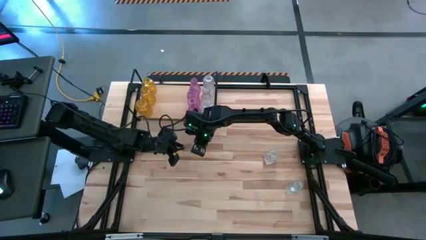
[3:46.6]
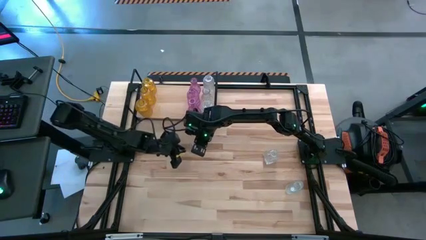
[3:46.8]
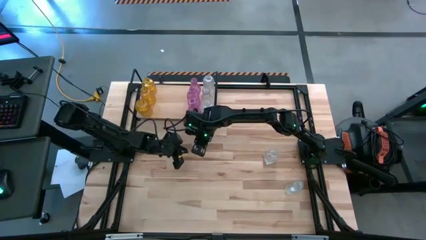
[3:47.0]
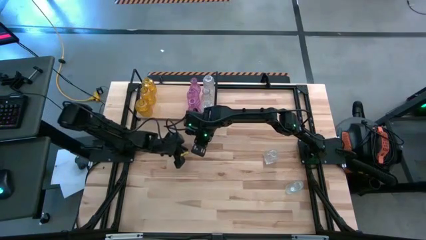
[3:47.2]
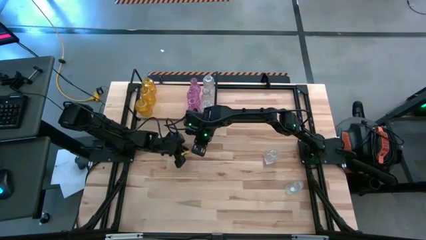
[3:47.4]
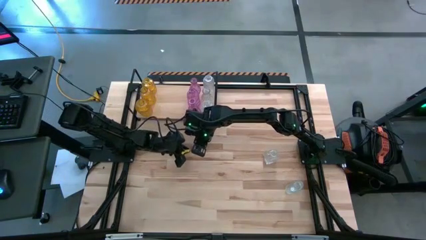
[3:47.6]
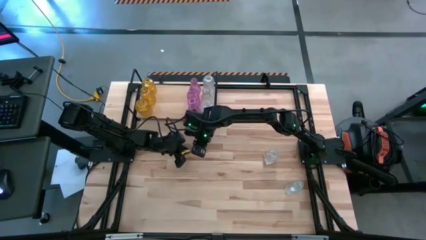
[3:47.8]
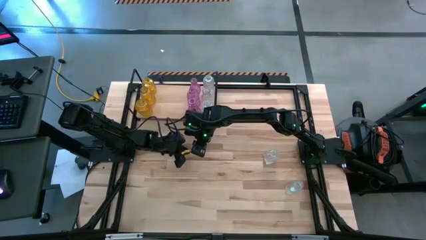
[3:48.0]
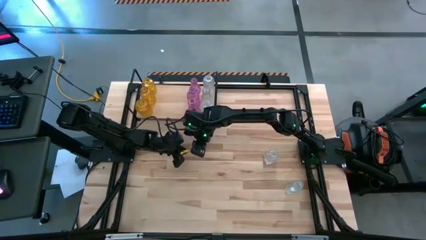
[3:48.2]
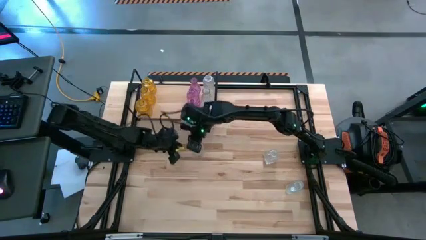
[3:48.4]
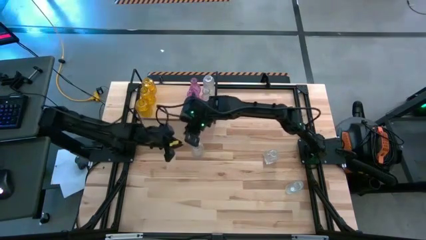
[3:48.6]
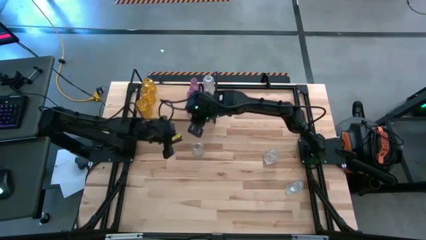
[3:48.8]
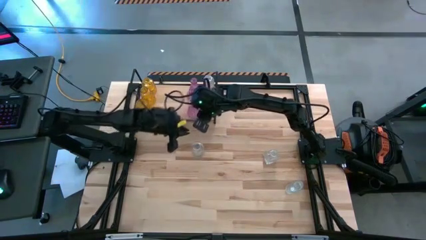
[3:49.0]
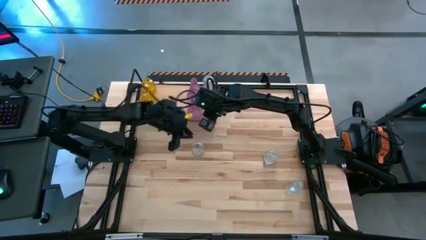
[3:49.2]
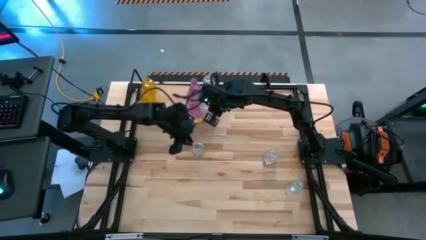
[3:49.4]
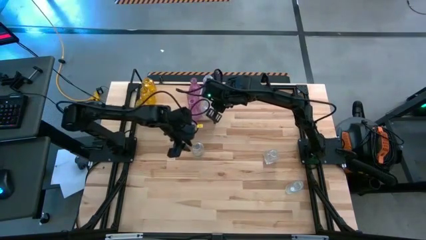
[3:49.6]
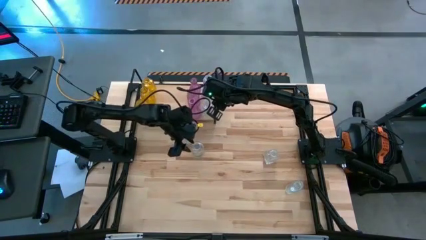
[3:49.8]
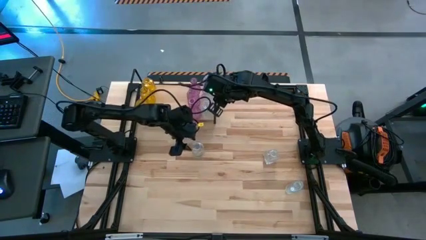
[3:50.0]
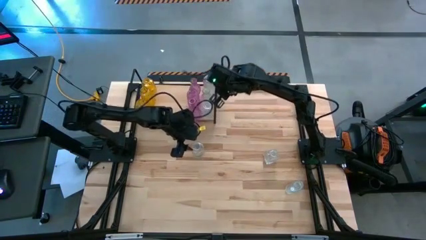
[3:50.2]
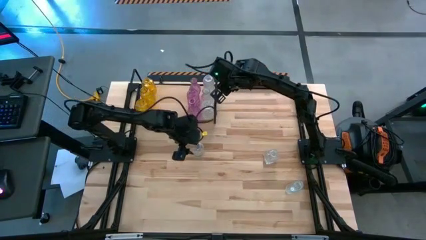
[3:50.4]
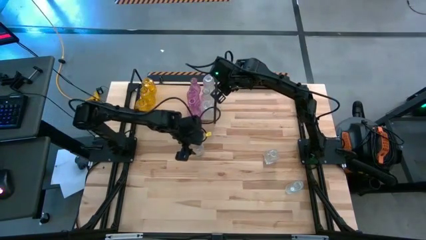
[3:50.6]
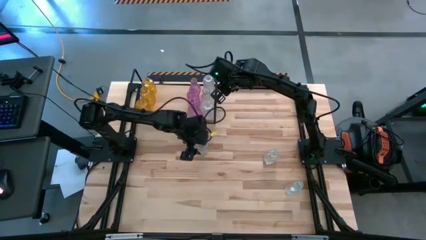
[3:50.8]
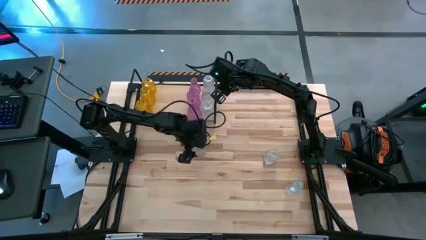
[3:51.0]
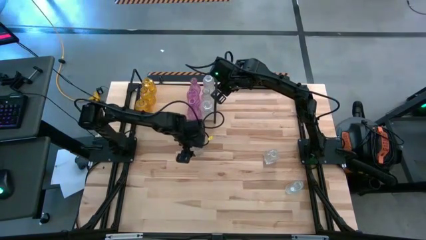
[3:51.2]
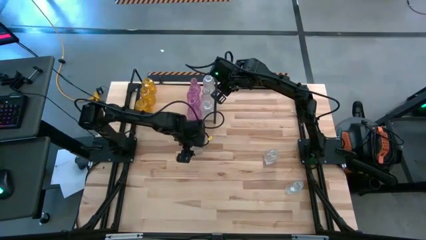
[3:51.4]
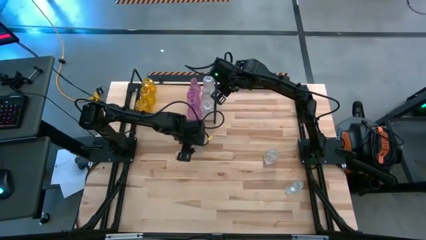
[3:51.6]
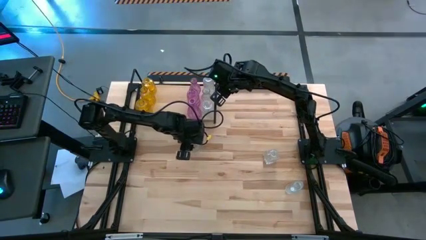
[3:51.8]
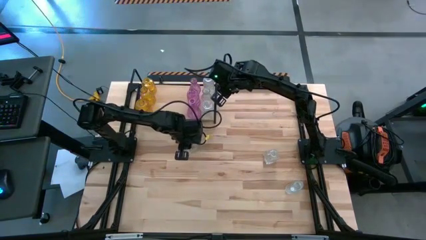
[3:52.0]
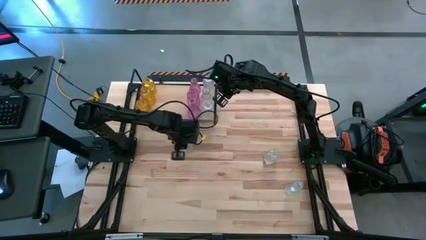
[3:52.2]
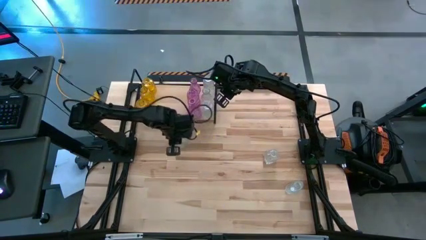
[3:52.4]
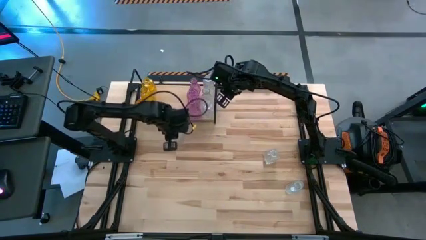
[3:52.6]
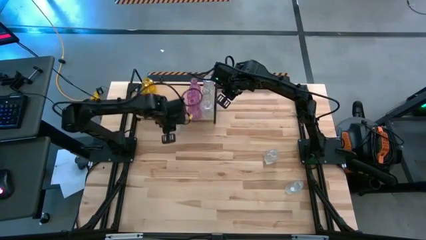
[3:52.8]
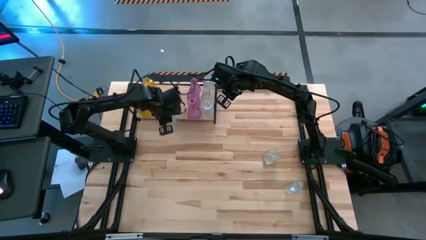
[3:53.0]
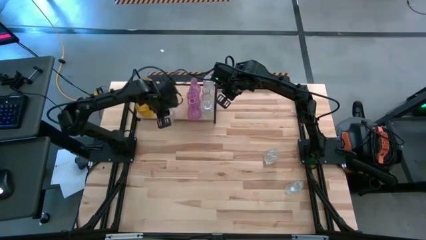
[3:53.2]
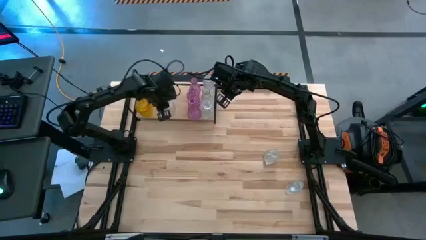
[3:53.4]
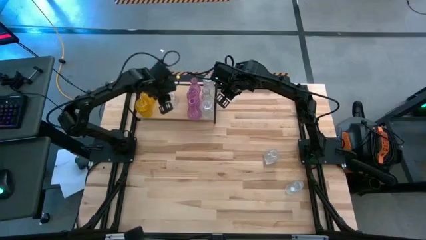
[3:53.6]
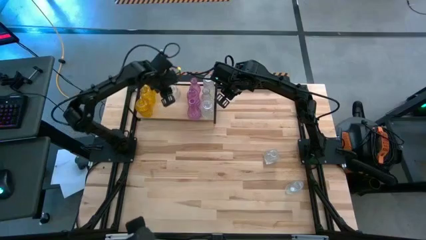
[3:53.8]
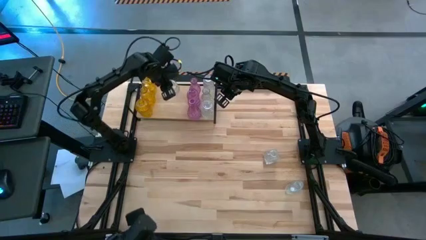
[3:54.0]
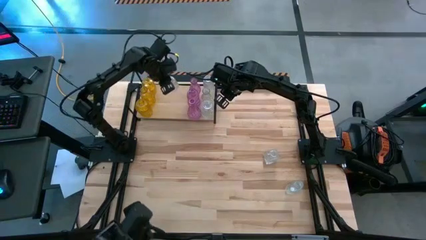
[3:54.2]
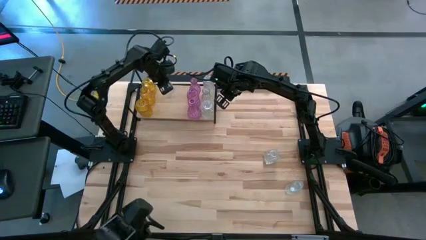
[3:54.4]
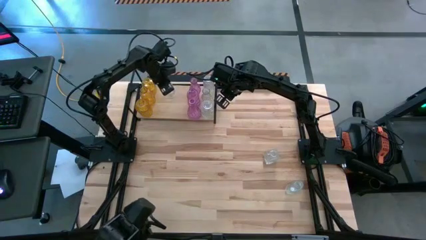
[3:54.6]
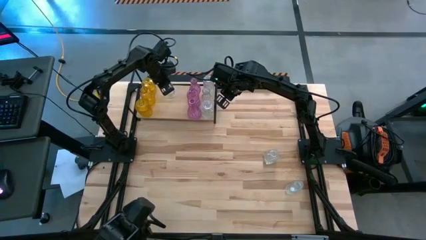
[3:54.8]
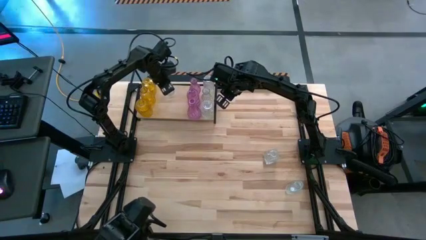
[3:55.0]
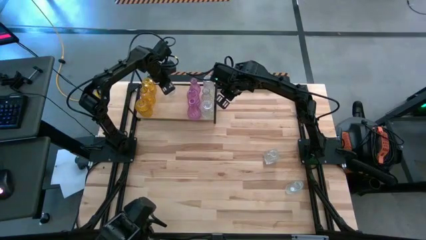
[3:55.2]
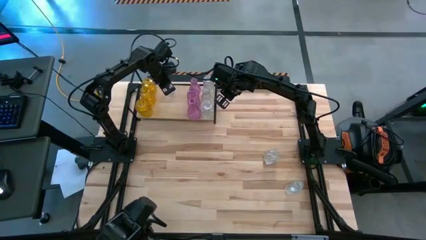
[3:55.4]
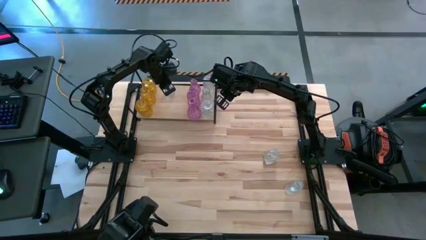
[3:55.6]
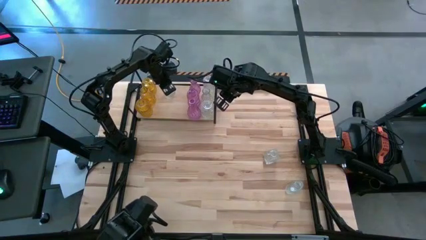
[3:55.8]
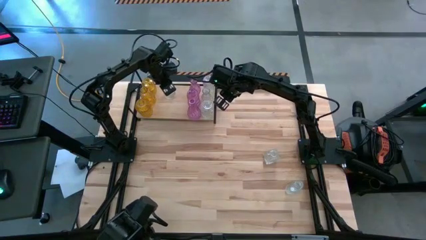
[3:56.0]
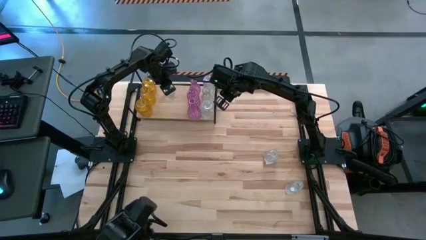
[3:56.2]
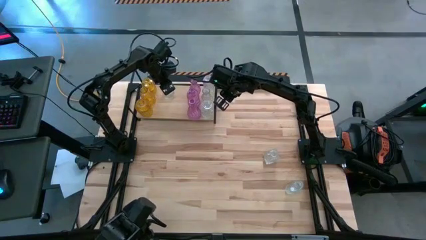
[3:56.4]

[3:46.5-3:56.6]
Task: sort vases onto shelf
Put the transparent vase on the shelf to the left of the top pink vase on the shelf

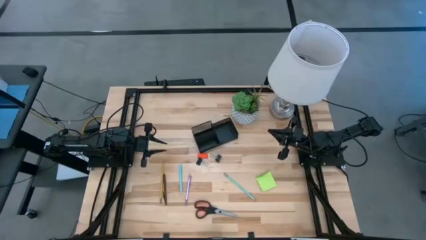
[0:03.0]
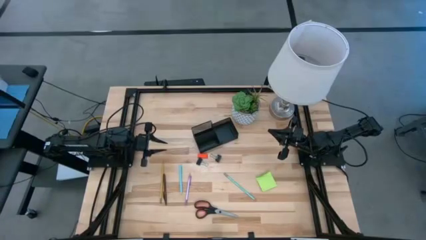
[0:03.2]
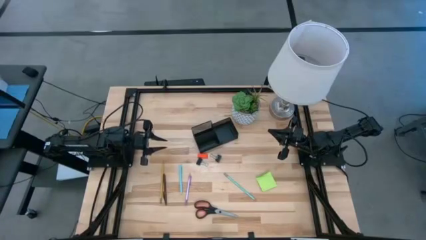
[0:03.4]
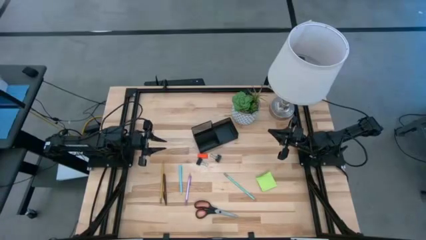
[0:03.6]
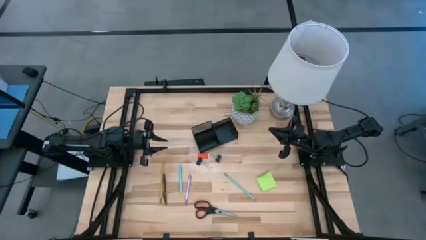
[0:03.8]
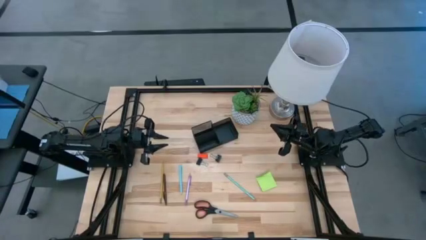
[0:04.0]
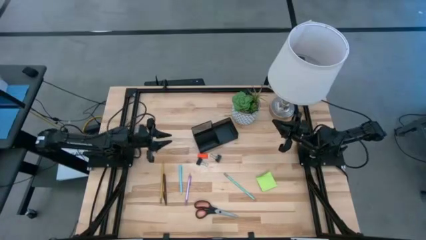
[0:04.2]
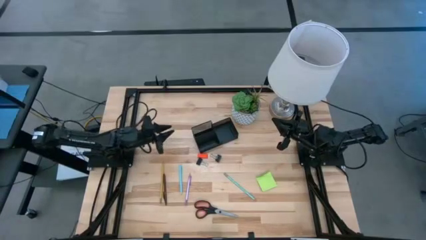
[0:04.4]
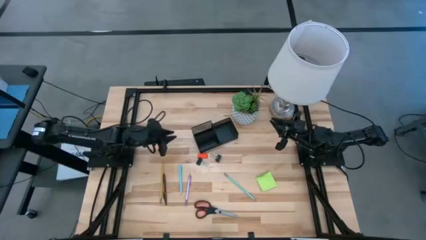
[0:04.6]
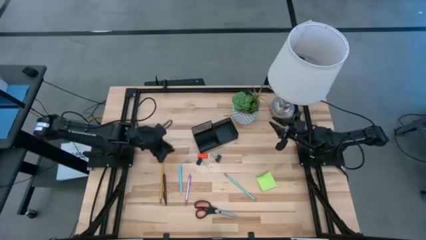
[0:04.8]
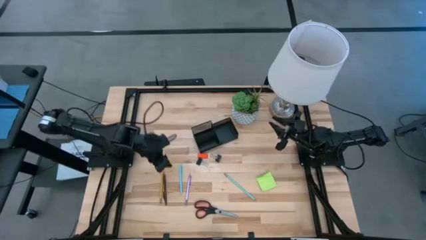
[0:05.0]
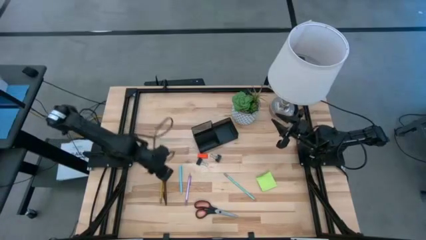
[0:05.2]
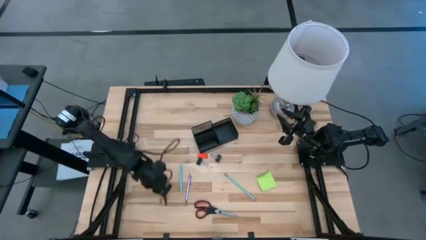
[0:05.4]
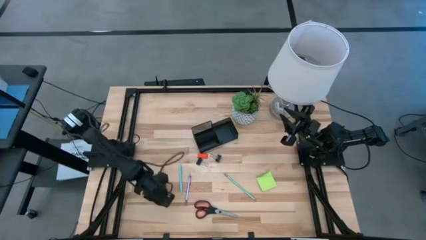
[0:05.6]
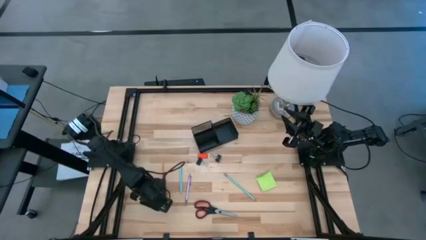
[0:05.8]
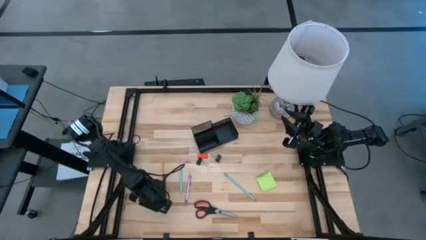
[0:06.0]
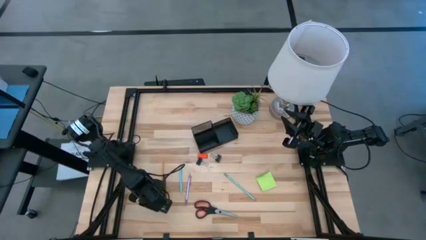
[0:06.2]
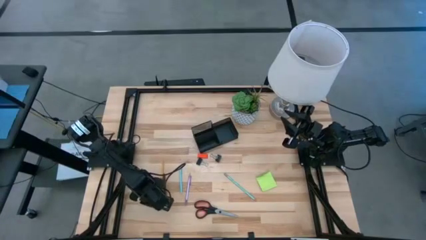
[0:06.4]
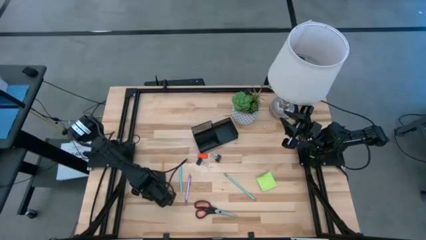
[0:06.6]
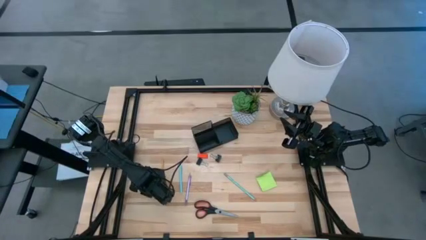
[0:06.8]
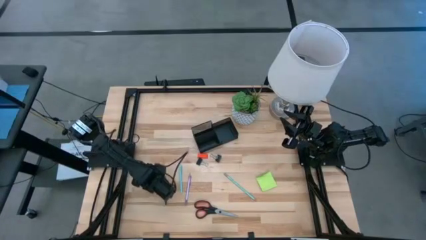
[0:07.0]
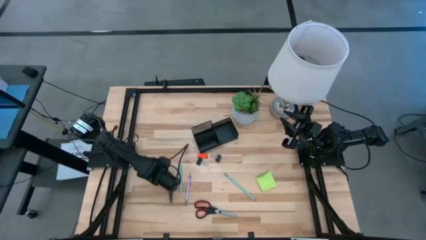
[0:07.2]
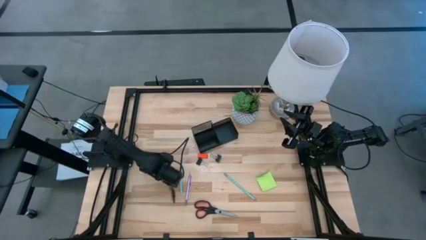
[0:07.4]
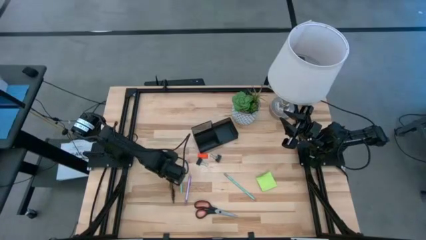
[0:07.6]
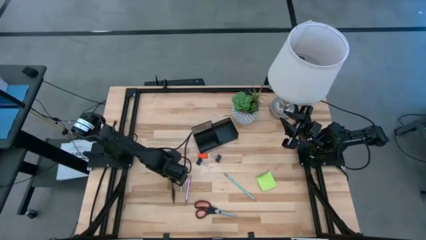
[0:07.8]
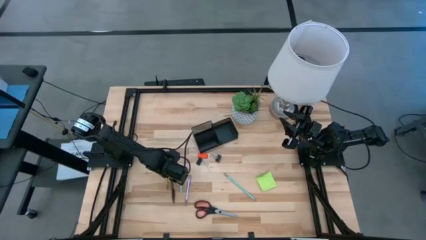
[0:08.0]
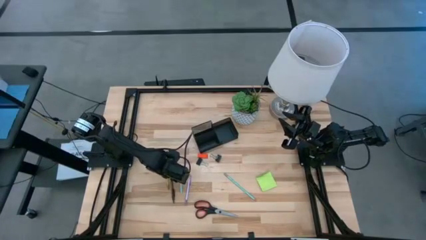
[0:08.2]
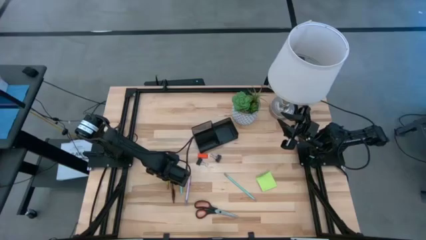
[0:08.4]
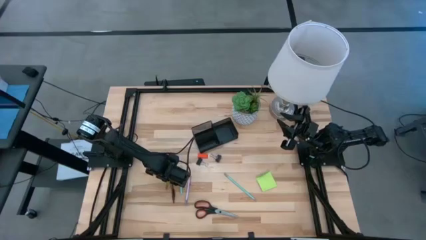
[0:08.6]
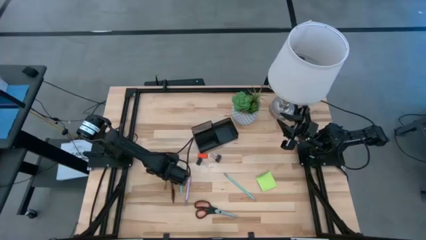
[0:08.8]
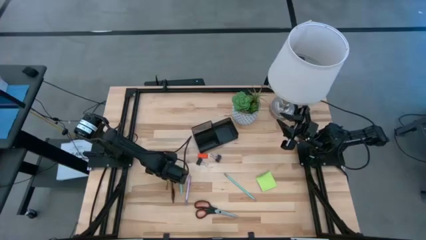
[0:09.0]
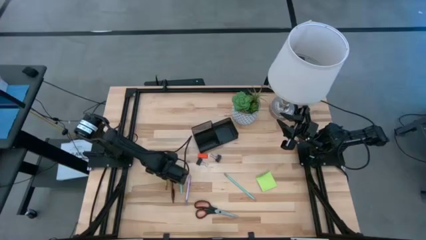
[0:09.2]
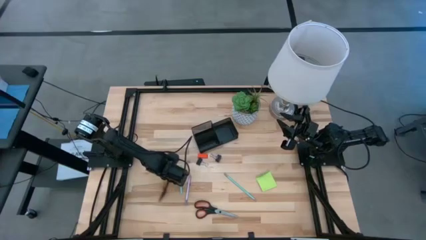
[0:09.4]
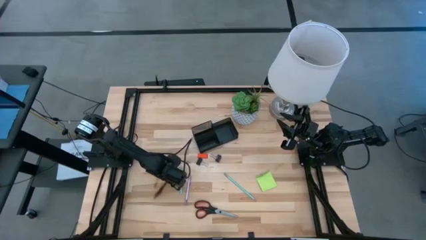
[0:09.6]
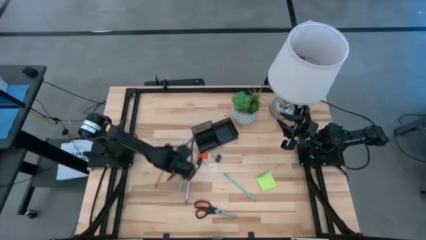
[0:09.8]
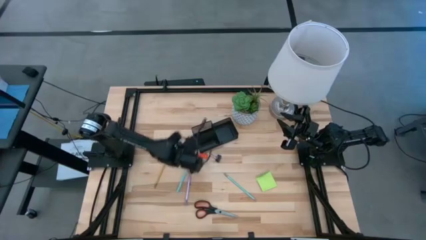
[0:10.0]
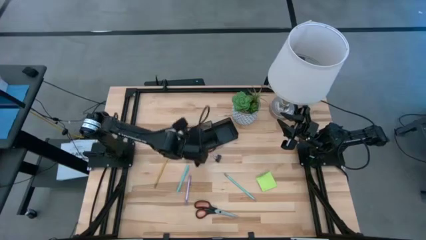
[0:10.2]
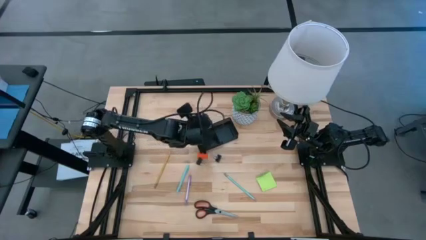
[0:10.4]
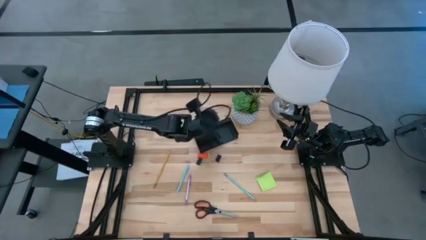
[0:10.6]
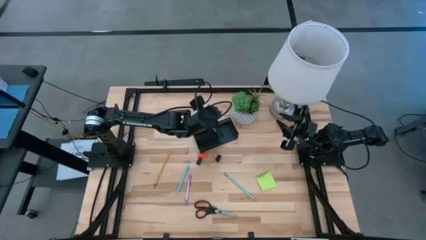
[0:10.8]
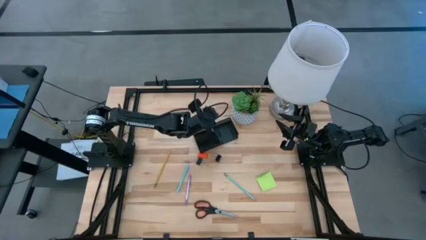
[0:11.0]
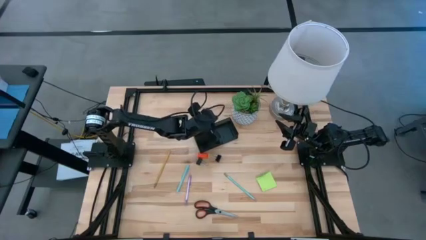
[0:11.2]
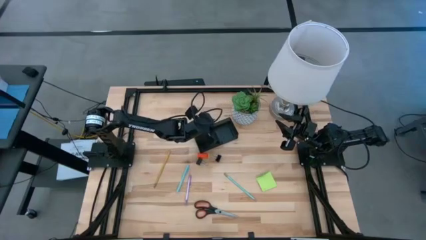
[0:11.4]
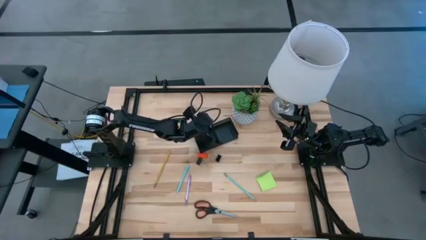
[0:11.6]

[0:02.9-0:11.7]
Task: Pick and place office supplies into organizer
Put the brown pen into the black desk organizer
